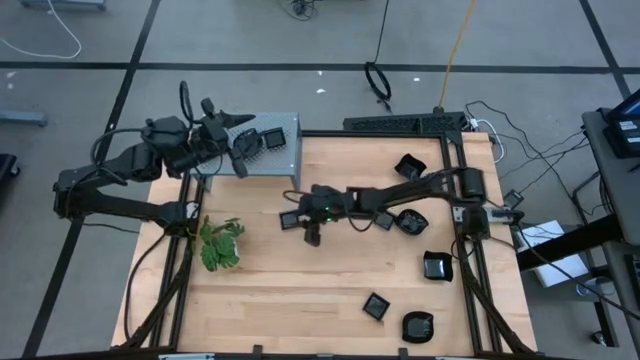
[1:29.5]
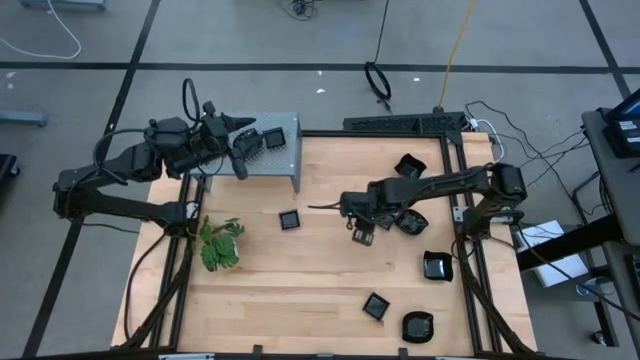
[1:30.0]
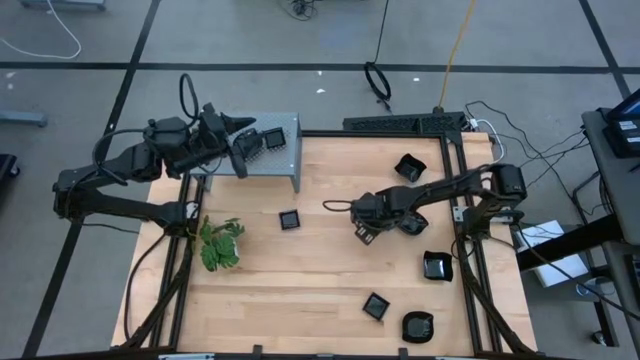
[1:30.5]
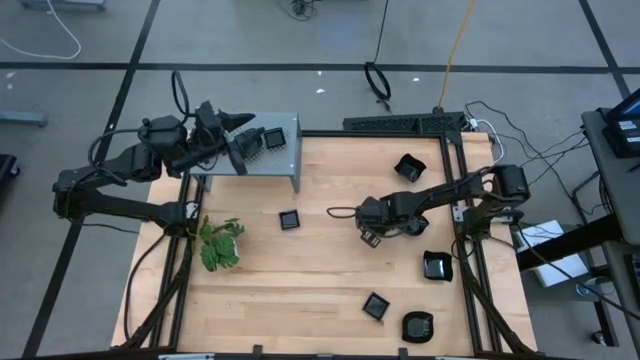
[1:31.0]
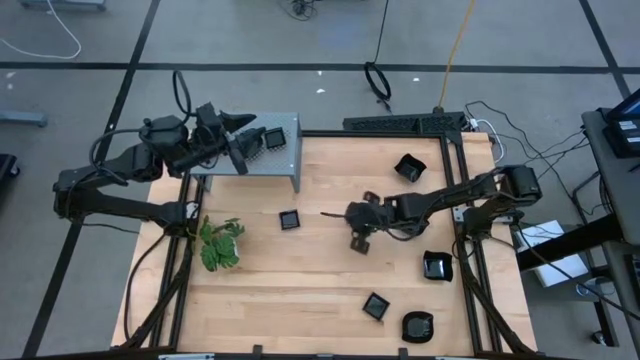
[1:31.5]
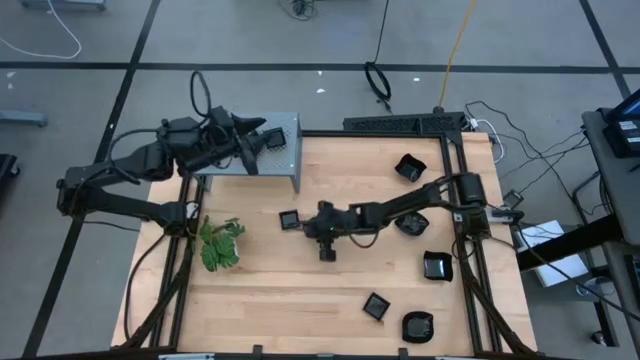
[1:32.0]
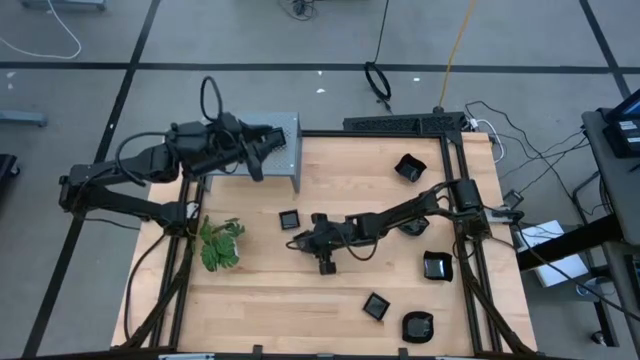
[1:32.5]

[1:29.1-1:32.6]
Task: Pick & Place Mini shaped plates
Move the square plate to the center of the table

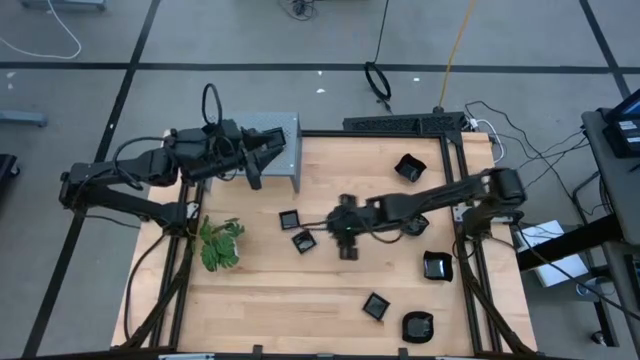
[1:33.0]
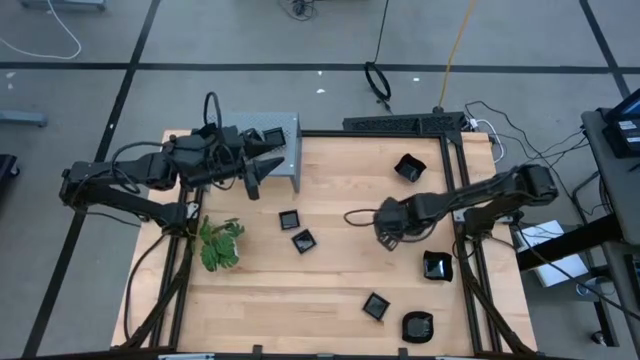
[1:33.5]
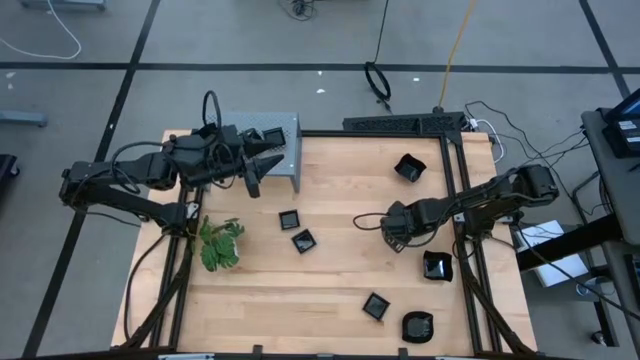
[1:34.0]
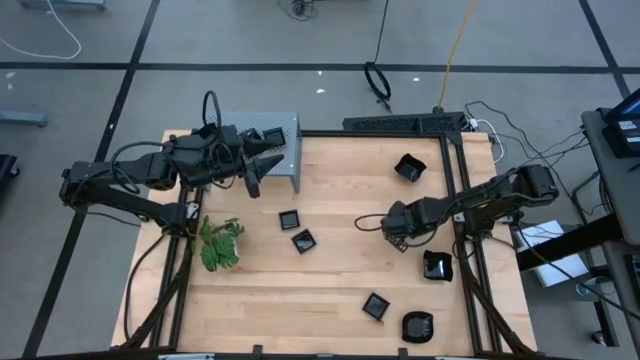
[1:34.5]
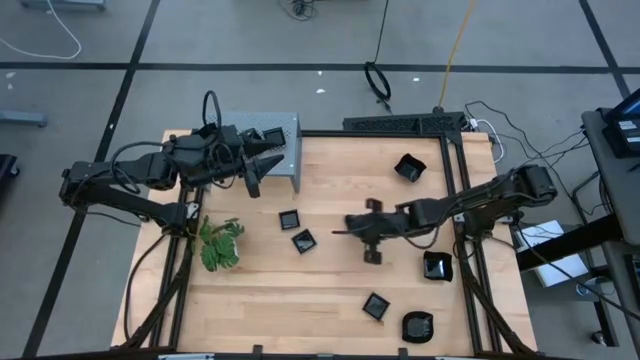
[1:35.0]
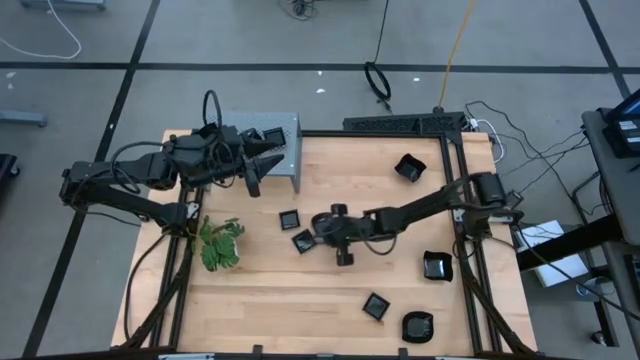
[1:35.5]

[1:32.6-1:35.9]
Move the leaf shaped plate to the center of the table

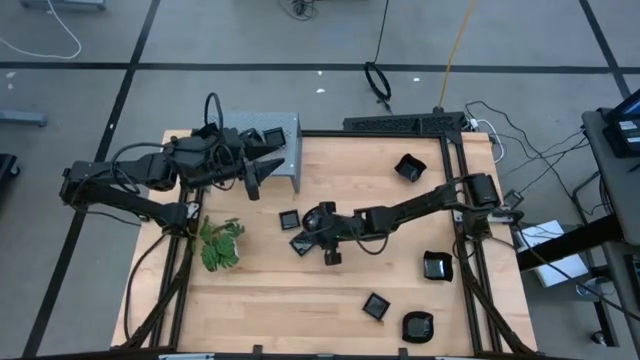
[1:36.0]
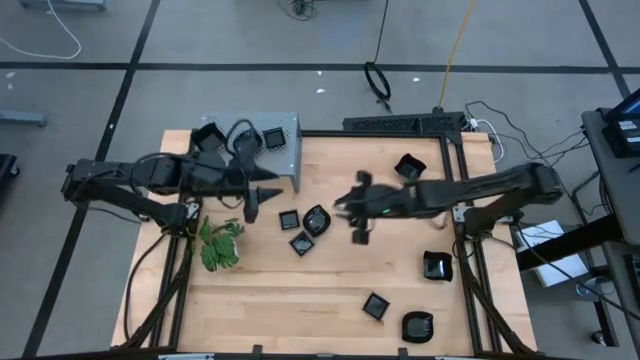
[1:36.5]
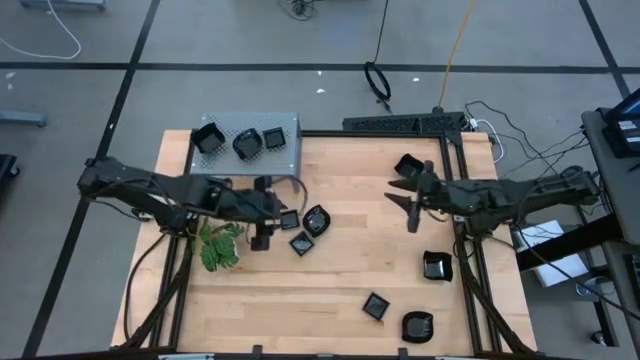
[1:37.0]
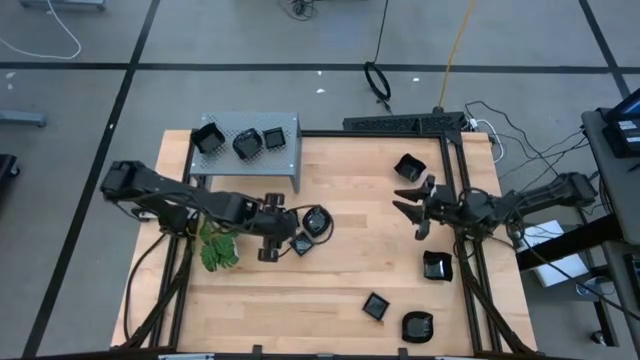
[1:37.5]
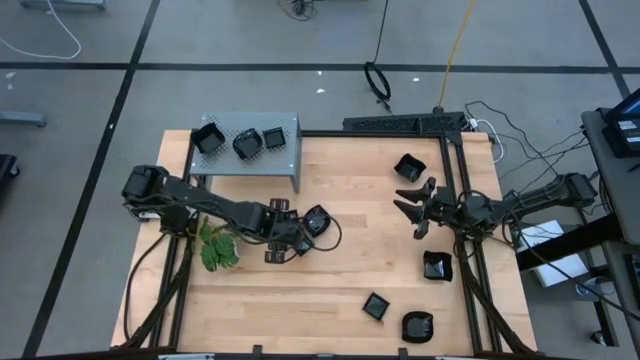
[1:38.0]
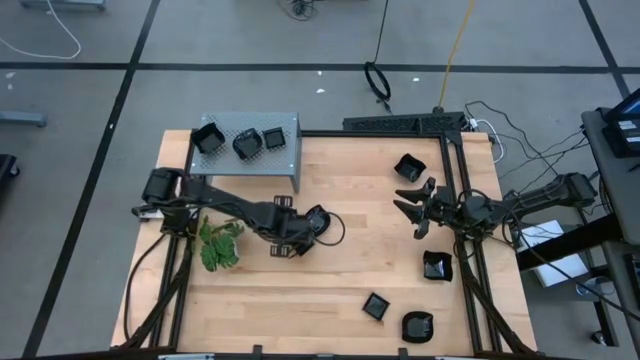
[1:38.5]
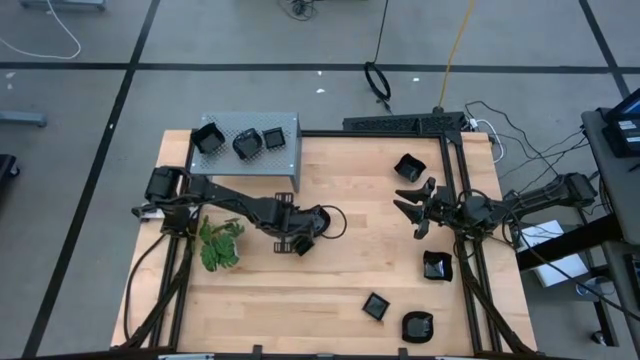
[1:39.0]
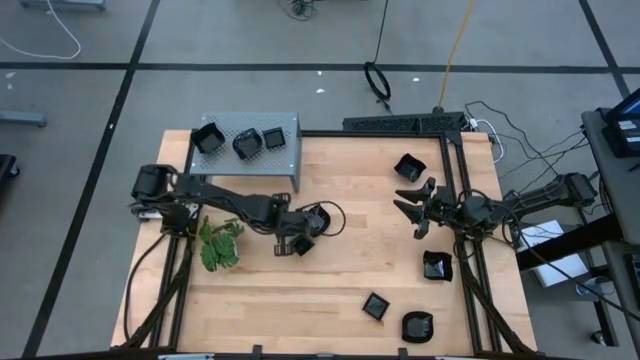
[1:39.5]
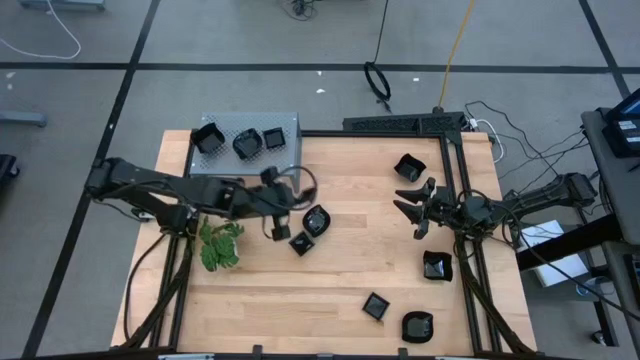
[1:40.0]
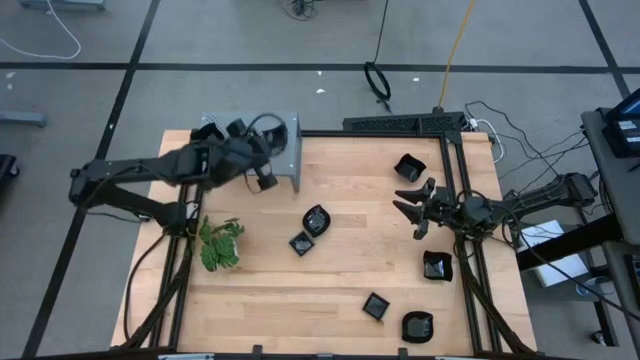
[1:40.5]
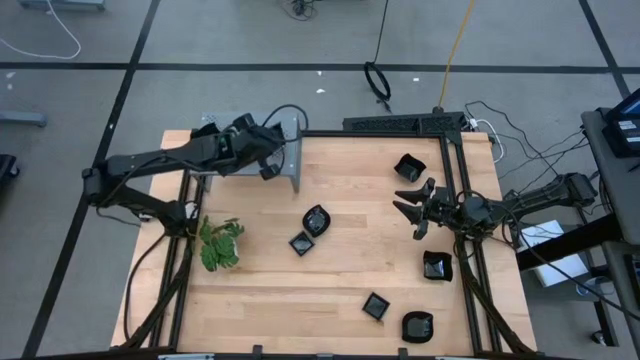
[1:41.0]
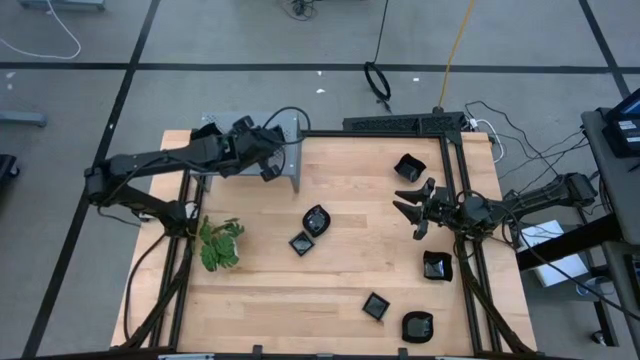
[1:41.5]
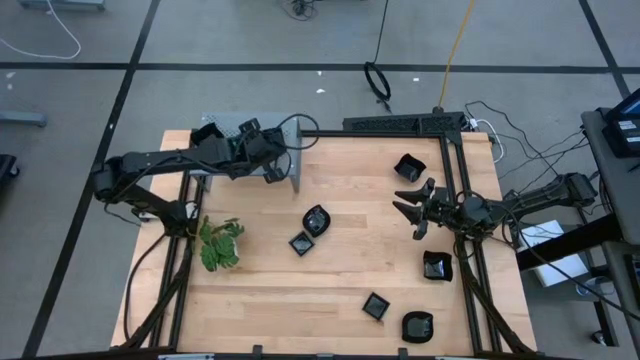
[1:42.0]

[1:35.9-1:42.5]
Stack the square plate on top of the square plate on the shelf

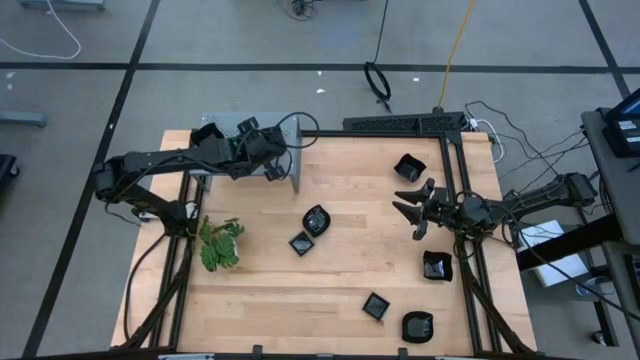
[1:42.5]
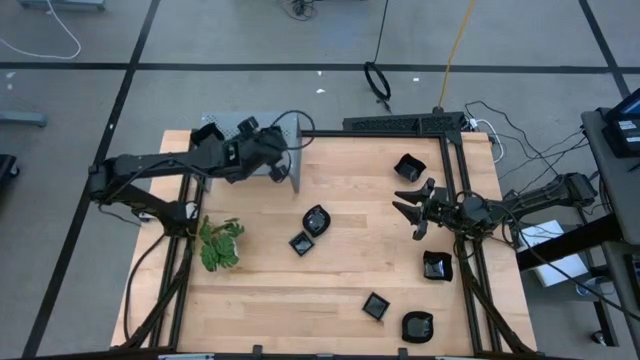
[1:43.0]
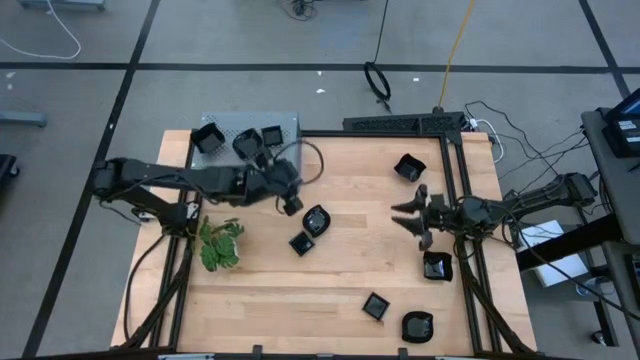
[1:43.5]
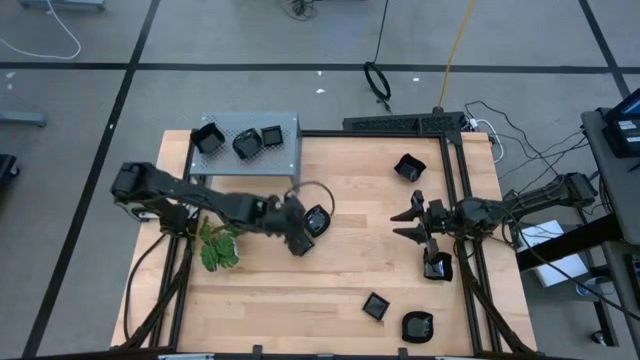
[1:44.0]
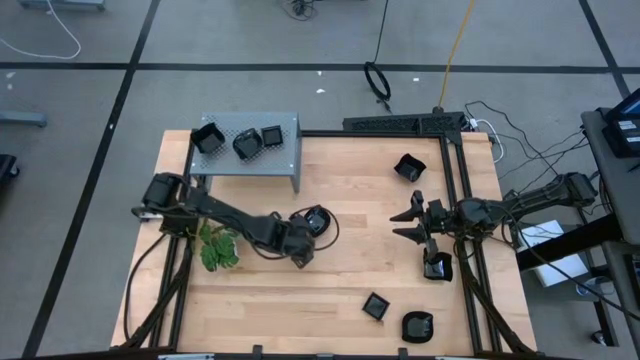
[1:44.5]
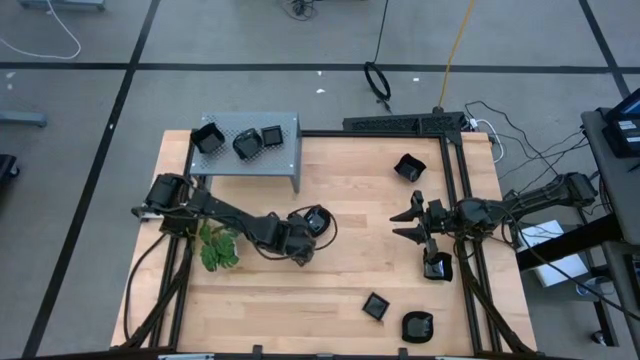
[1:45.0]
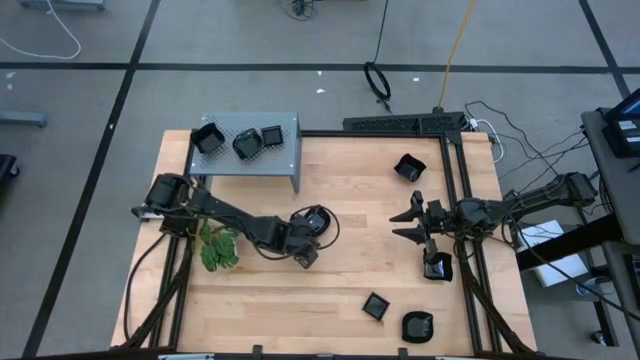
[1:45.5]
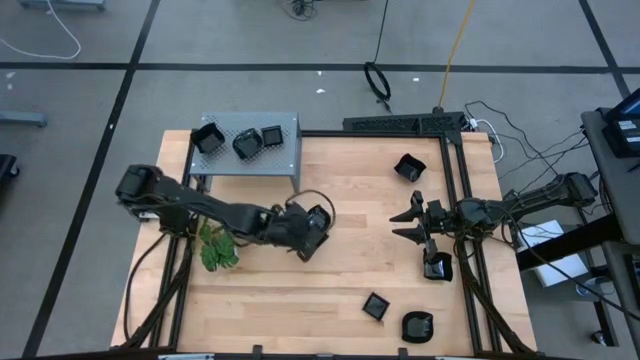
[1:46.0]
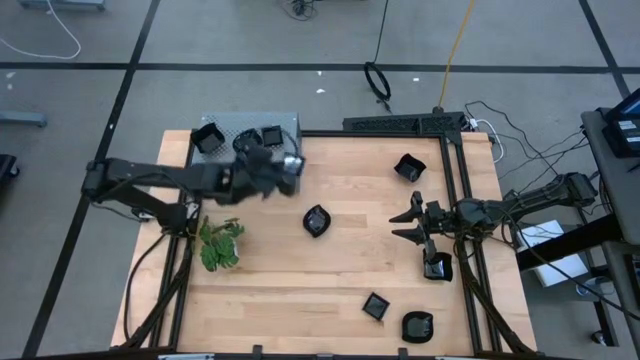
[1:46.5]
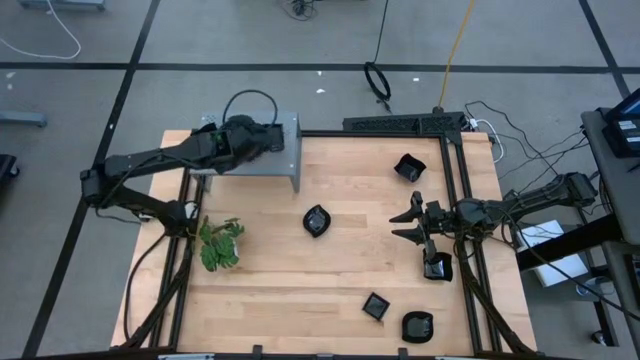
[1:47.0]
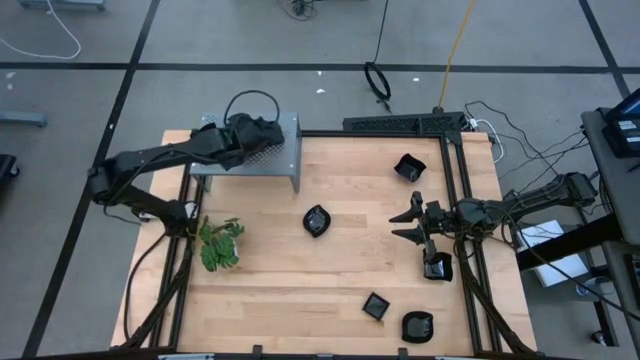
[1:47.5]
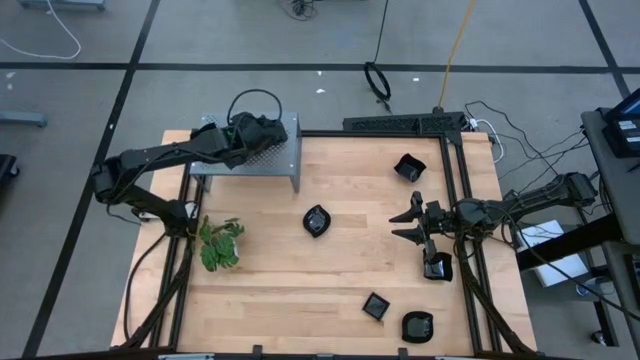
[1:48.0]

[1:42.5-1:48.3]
Stack the square plate on top of the square plate on the shelf

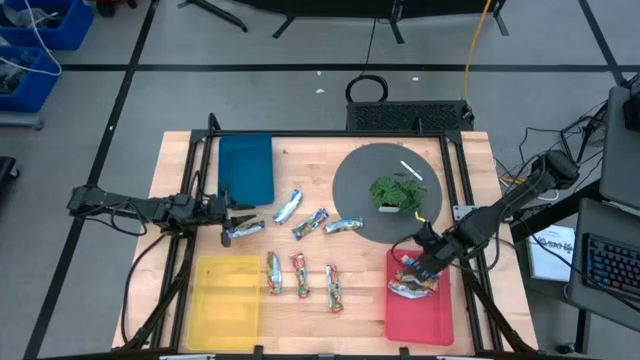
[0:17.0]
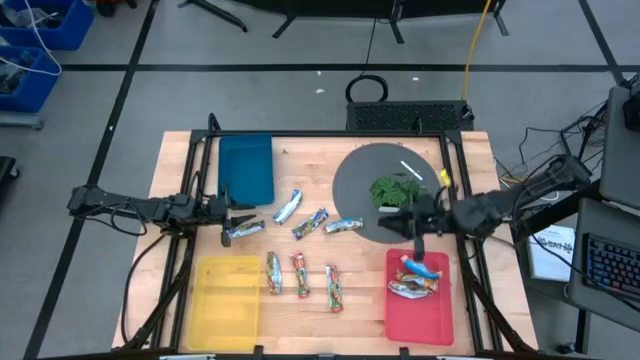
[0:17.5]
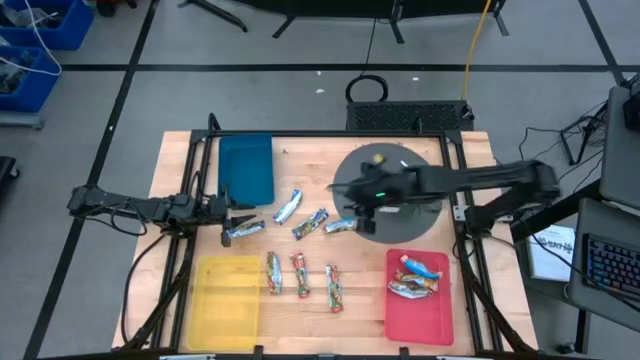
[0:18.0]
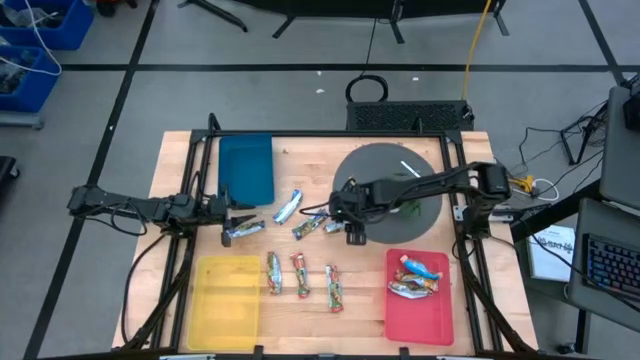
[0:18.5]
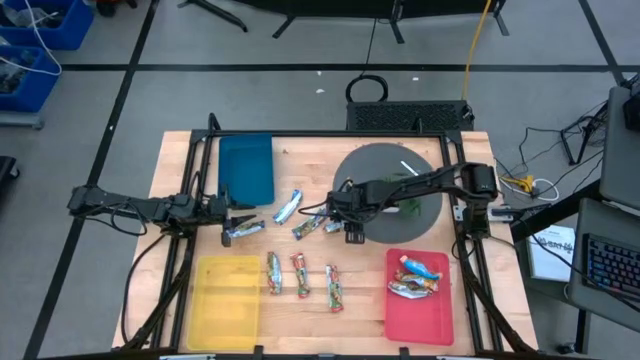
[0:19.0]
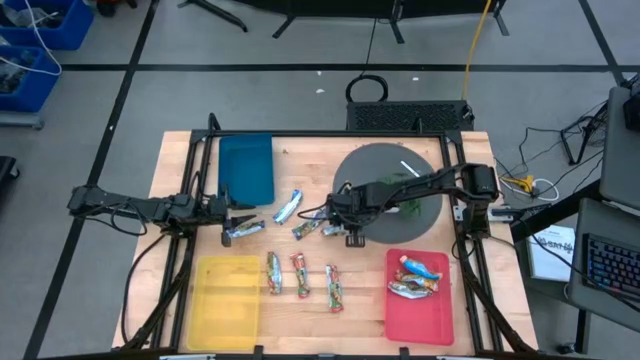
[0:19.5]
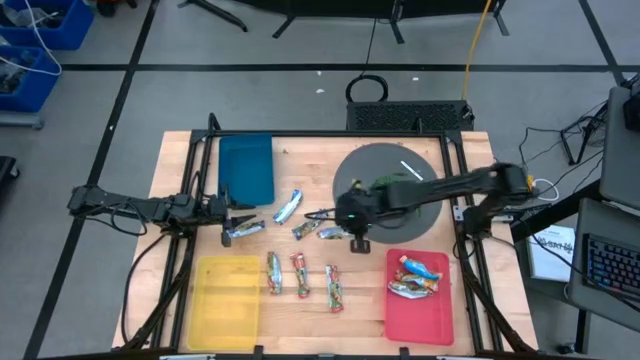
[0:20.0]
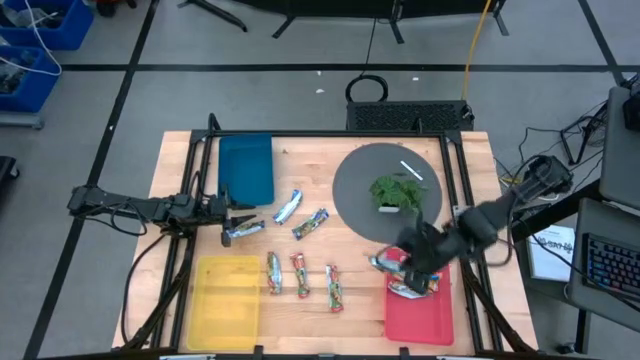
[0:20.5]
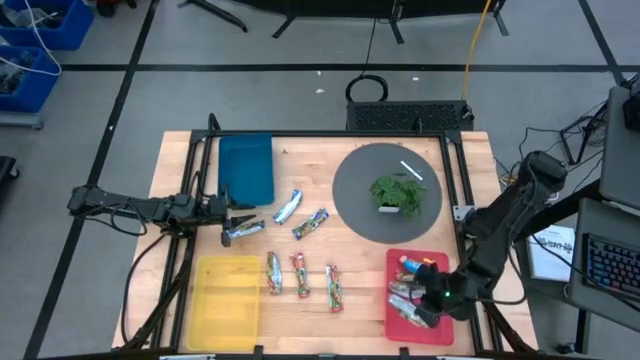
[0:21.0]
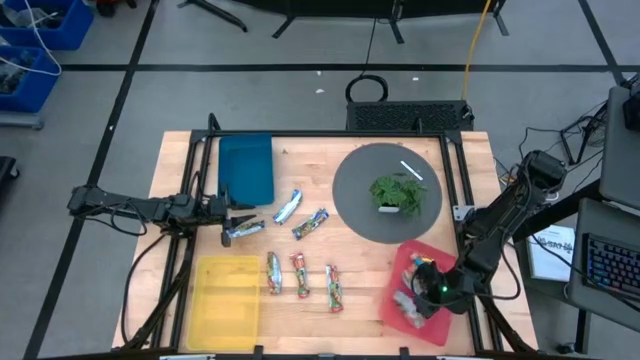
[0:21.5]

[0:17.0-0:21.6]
Task: Pick and place Granola Bars by type
Put the yellow granola bar into the pink bin
